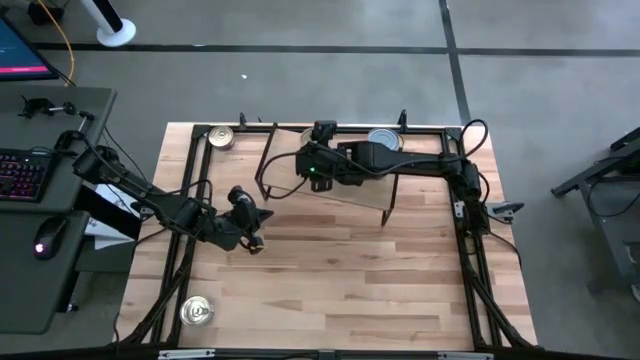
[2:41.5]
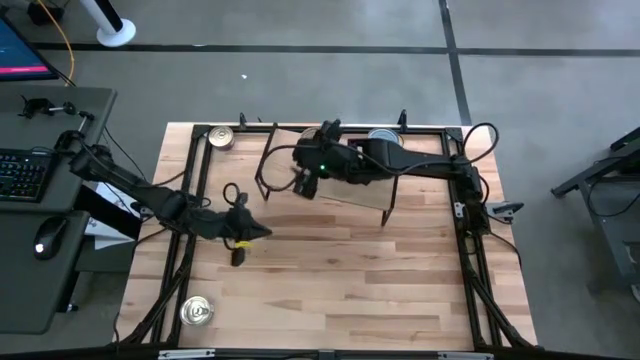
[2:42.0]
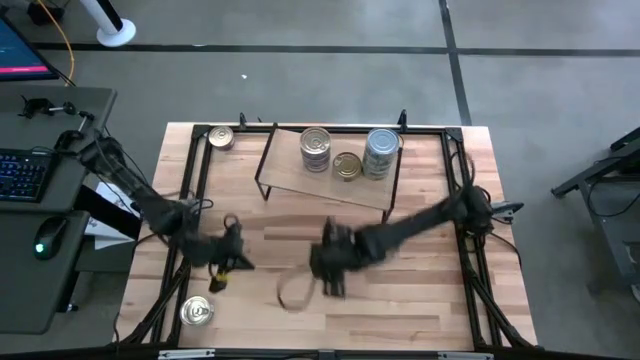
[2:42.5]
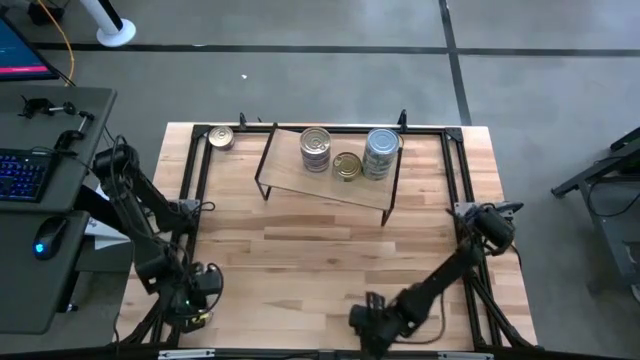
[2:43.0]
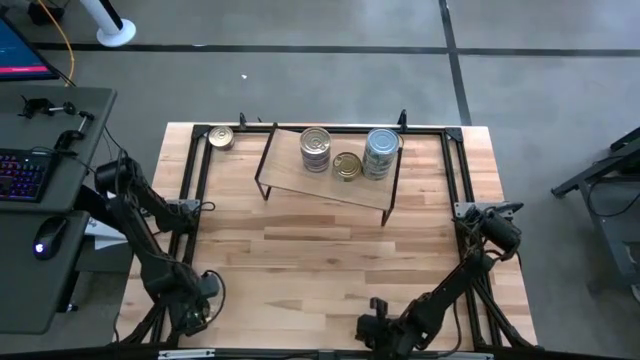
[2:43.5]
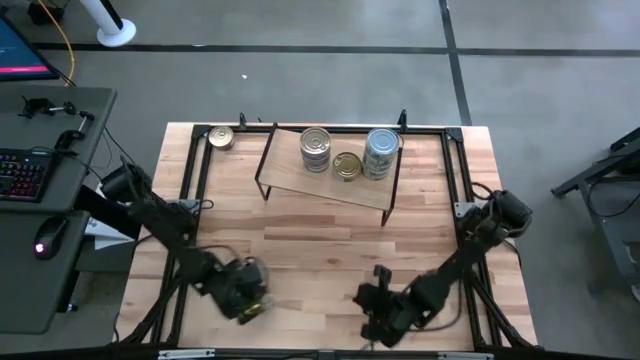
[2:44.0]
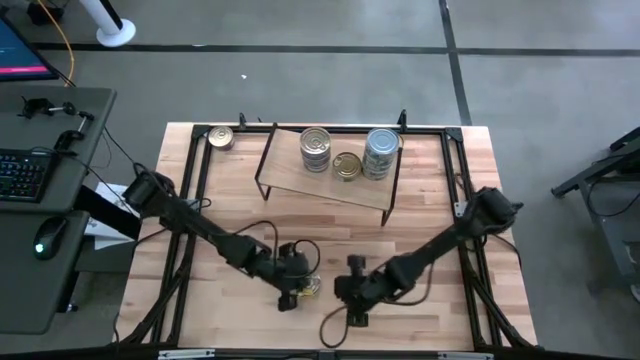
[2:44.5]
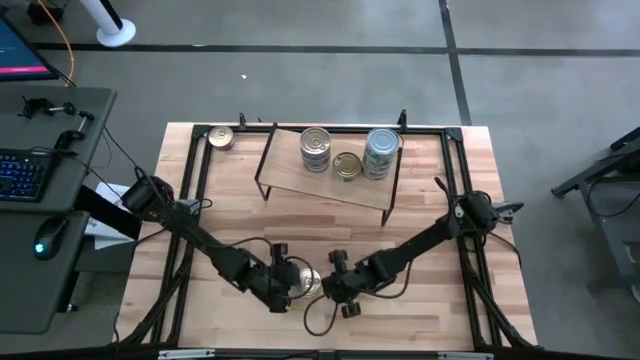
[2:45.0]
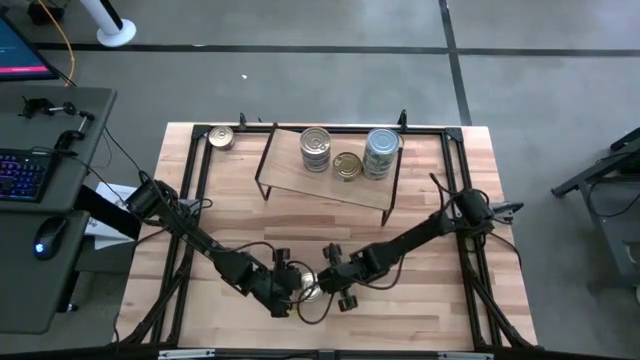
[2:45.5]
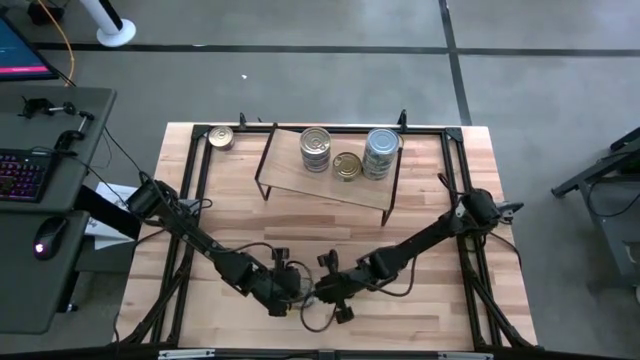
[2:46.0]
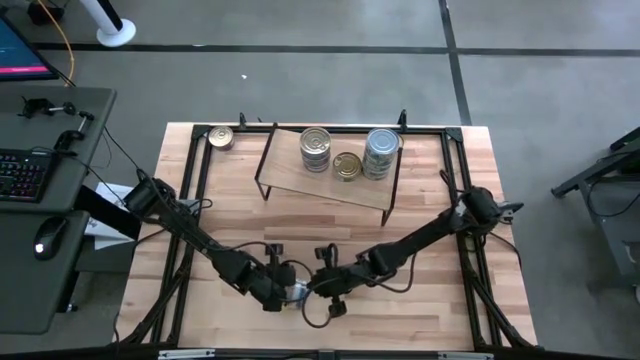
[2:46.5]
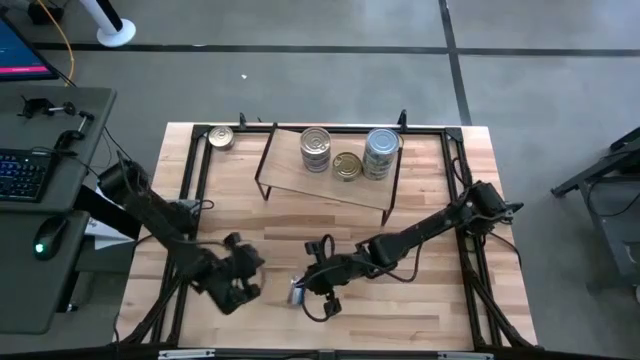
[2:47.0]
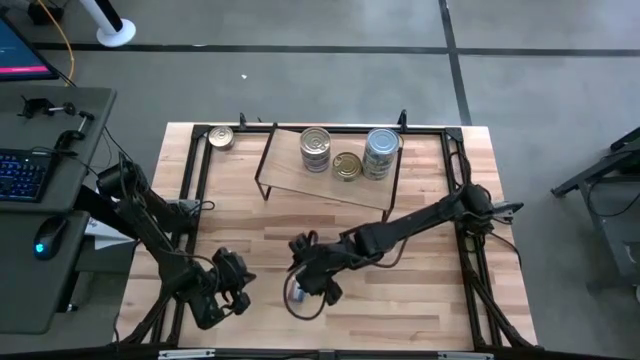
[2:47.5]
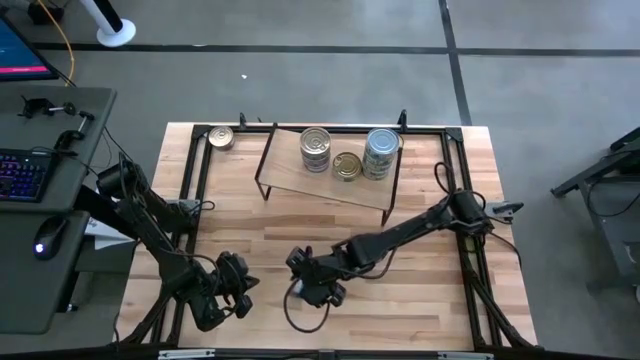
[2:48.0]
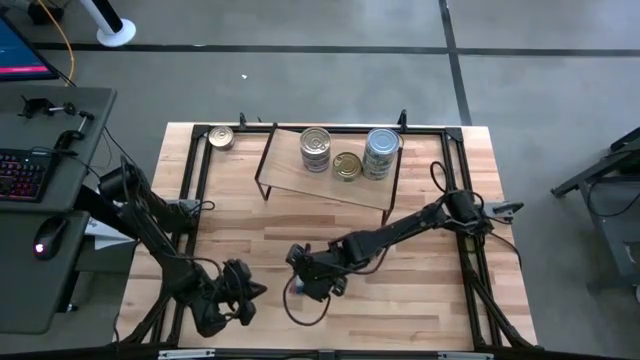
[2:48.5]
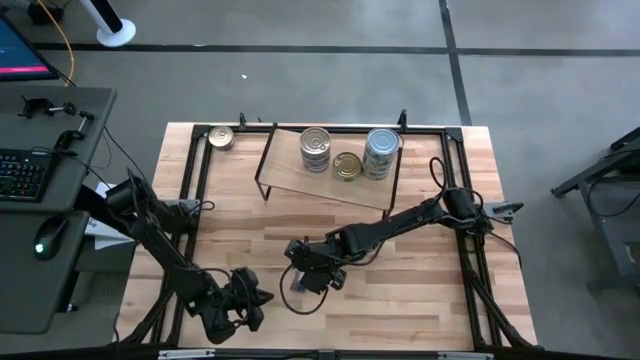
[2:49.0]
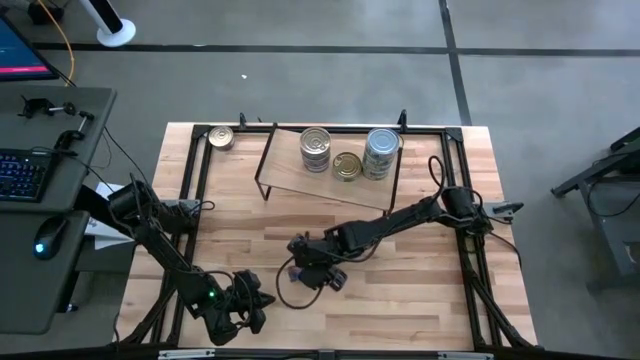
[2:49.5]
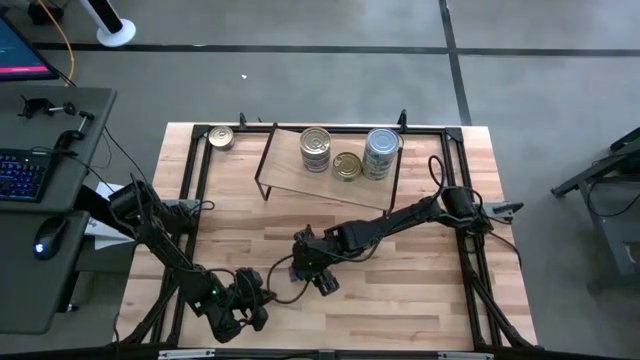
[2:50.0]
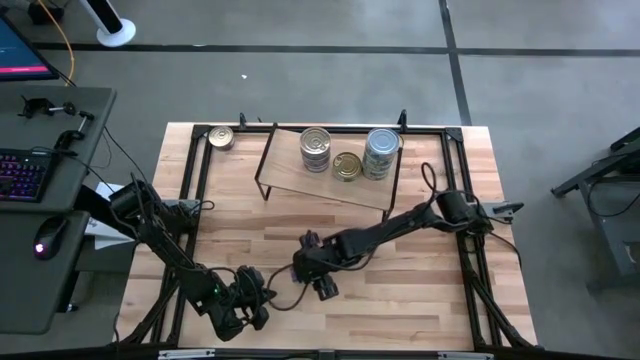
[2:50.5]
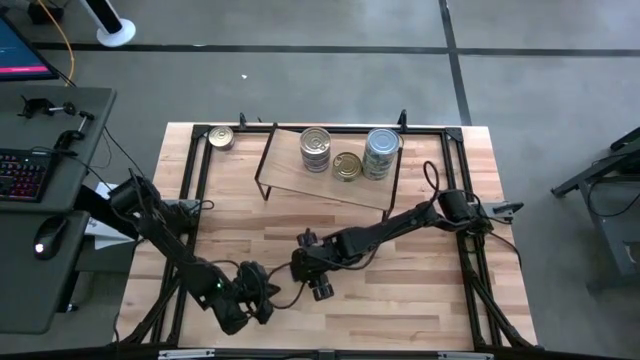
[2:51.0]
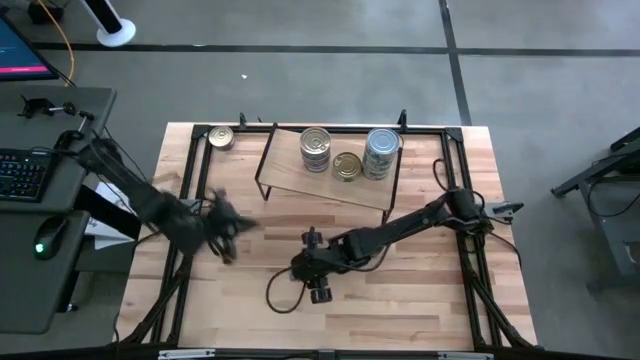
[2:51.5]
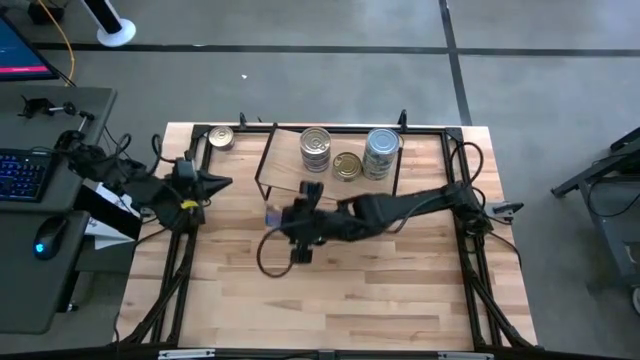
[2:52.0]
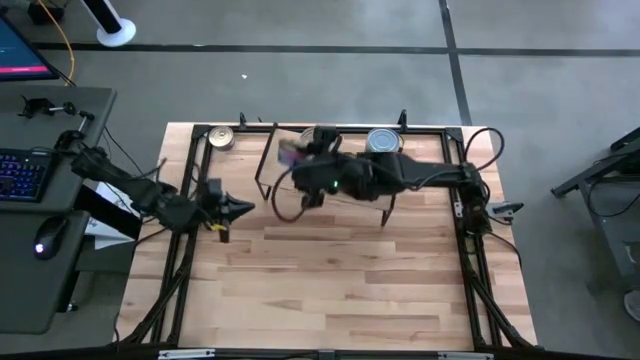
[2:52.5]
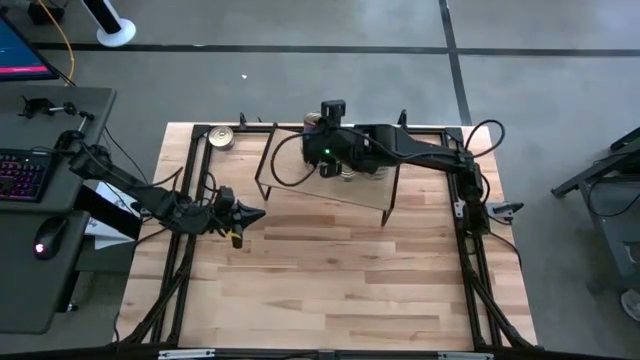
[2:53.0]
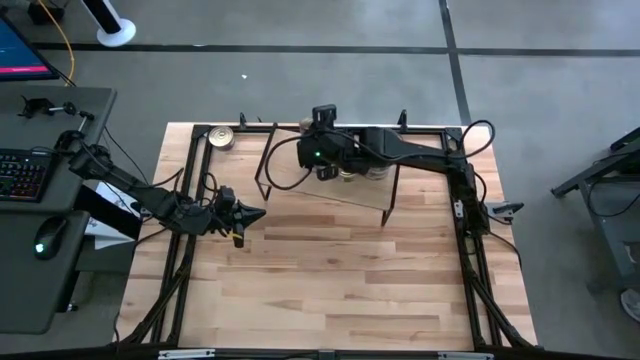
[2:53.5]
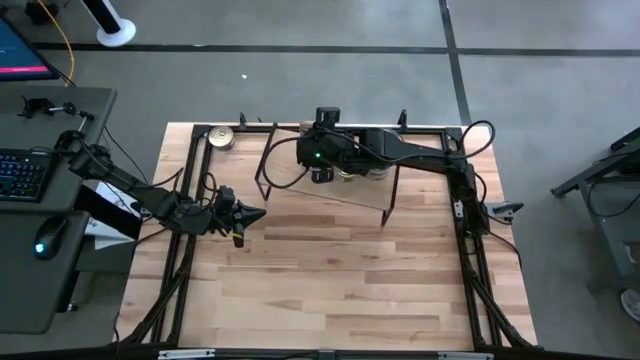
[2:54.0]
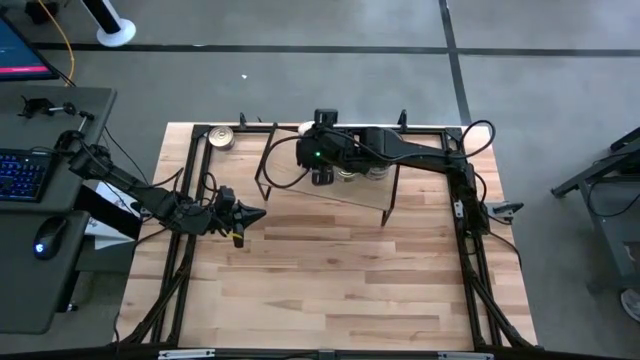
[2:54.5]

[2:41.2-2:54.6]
Task: Stack canned seafood by type on shelf
Stack the blue pink tuna can on top of the other blue pink tuna can on the shelf

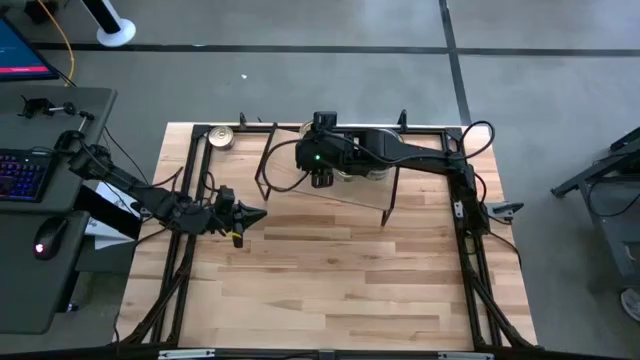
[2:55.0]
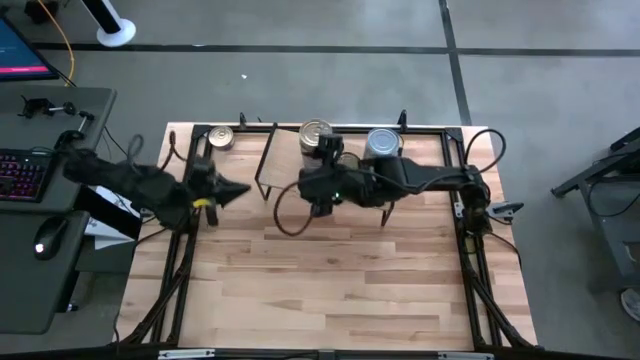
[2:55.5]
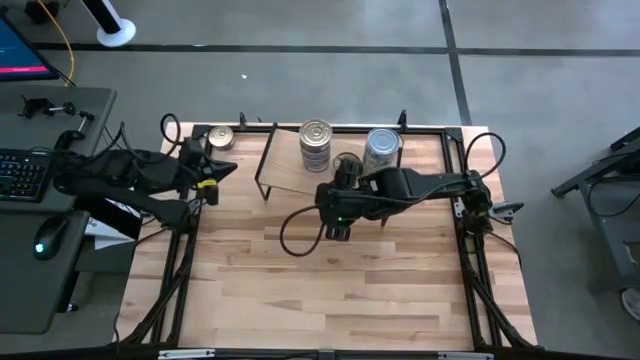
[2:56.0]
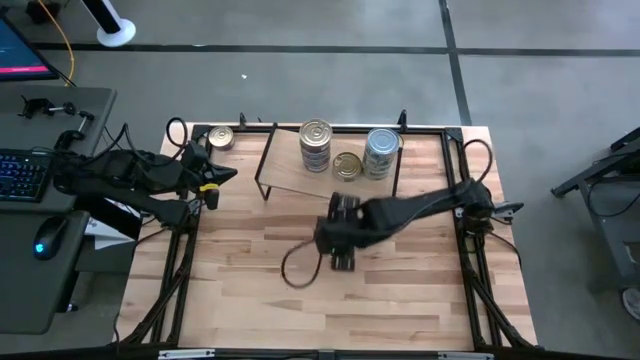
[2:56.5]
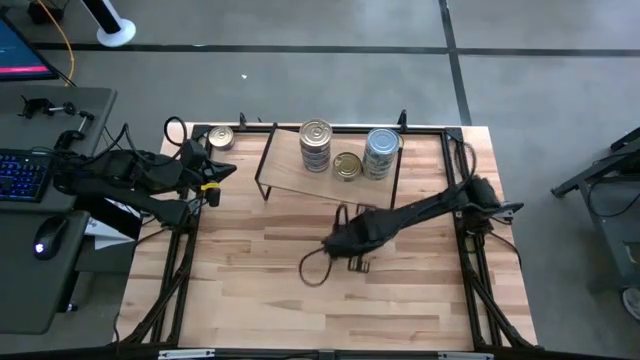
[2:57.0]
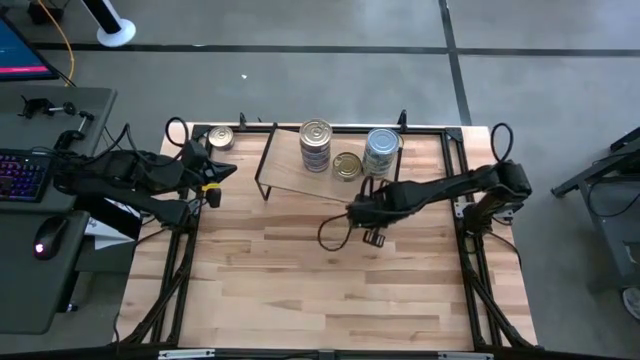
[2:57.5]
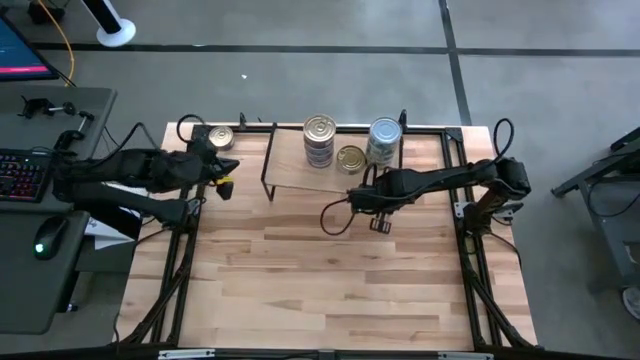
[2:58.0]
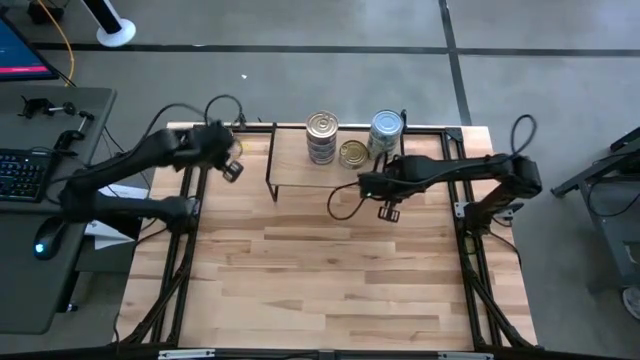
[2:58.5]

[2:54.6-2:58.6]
Adjust the shelf on the table

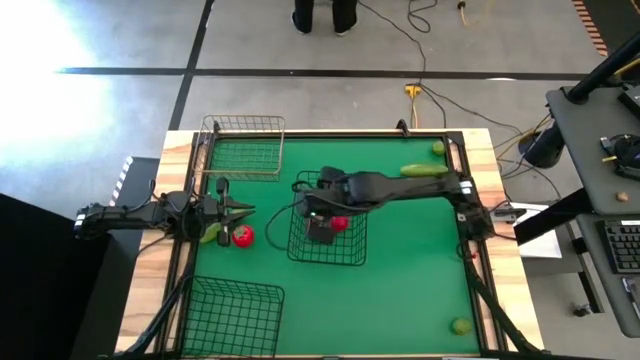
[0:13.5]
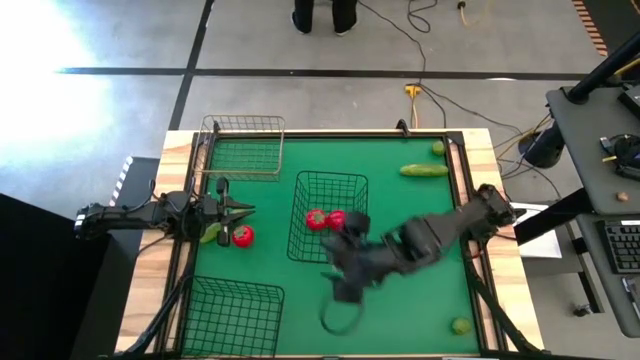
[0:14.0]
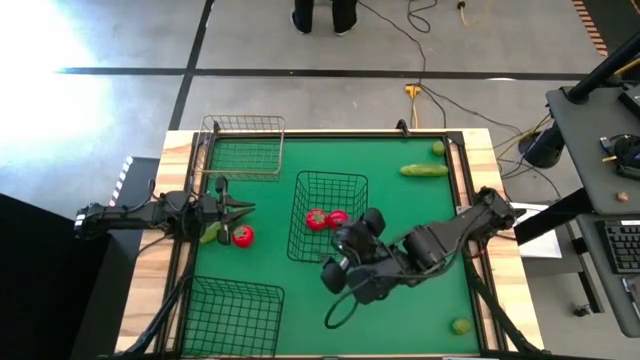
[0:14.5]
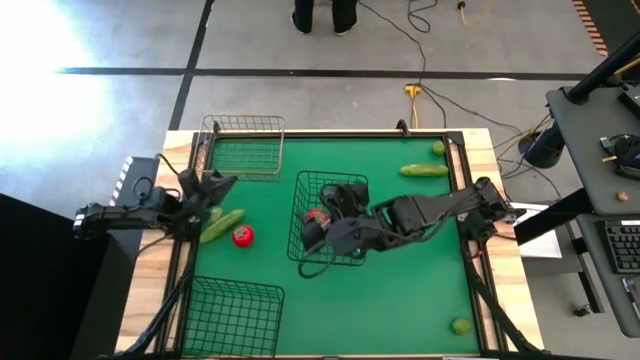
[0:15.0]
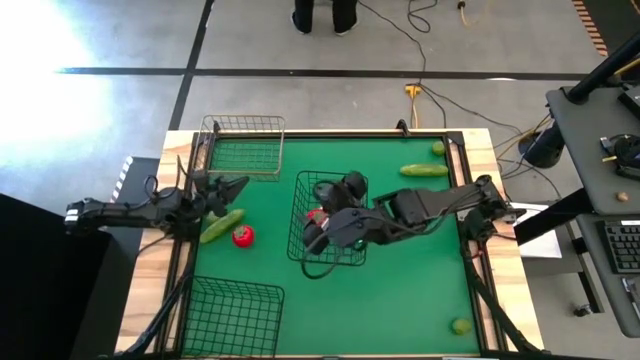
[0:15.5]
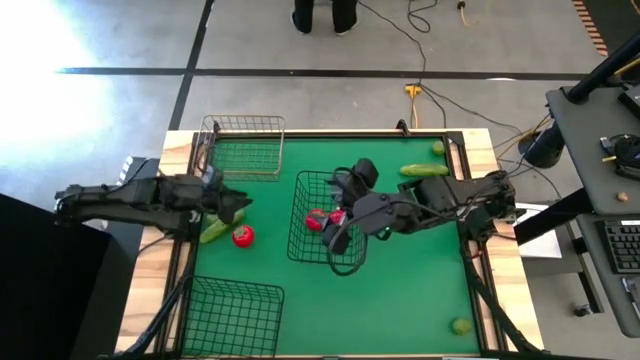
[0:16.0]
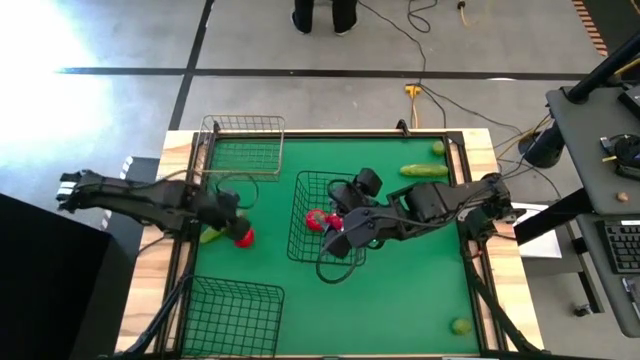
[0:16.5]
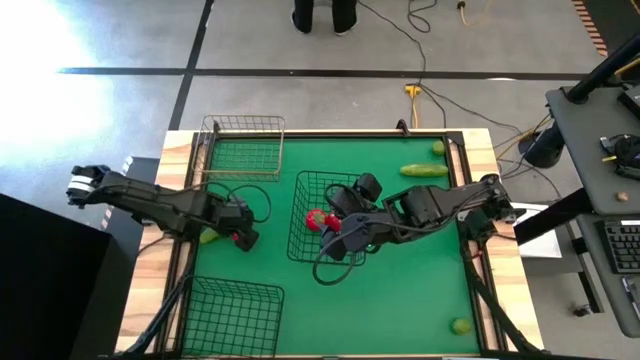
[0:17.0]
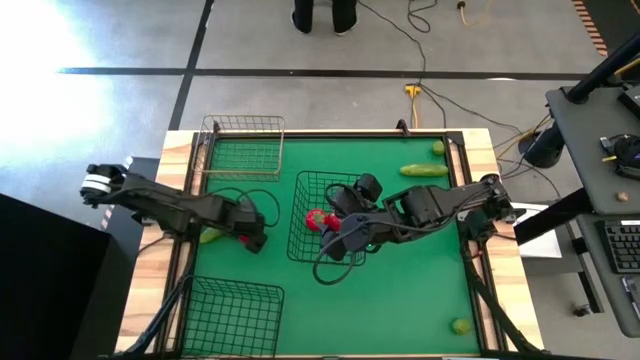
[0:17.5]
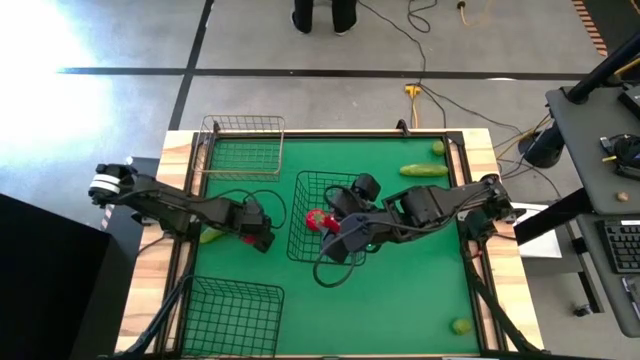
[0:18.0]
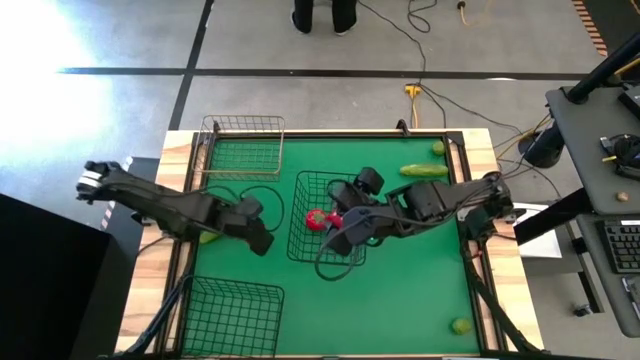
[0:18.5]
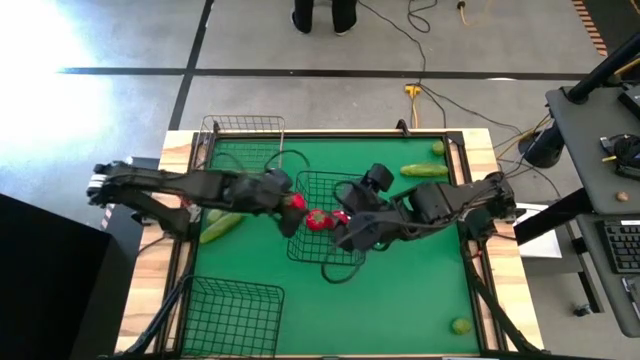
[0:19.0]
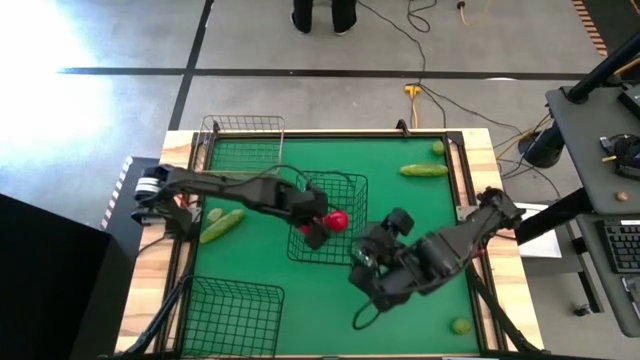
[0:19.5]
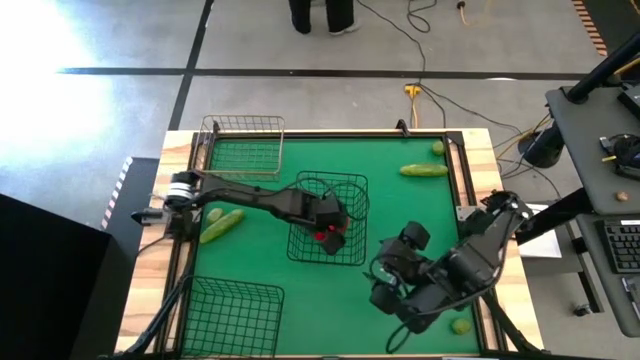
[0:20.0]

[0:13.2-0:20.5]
Task: Sort produce into baskets
Put the tomato into the top black wire basket
